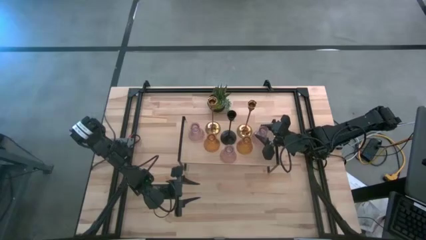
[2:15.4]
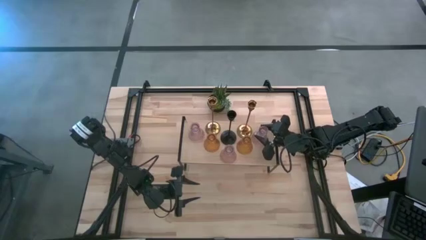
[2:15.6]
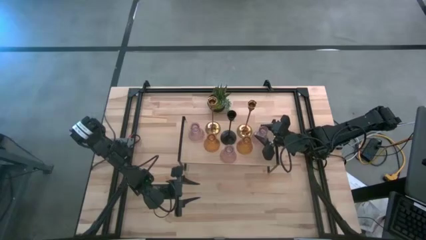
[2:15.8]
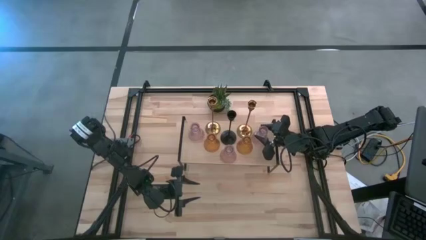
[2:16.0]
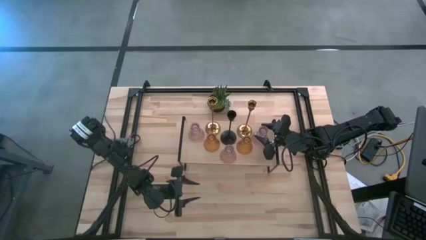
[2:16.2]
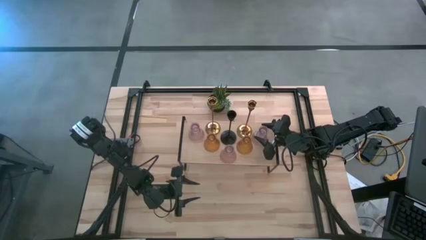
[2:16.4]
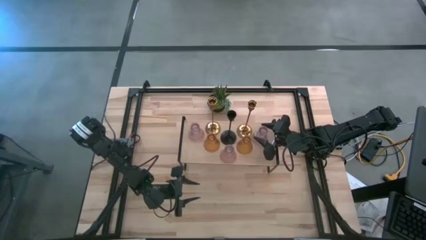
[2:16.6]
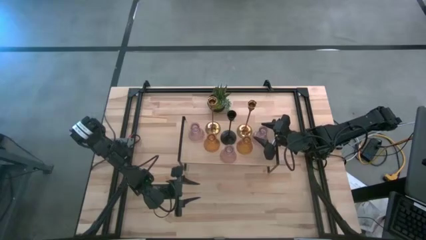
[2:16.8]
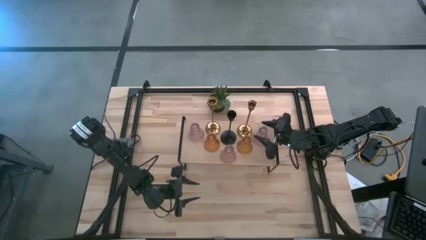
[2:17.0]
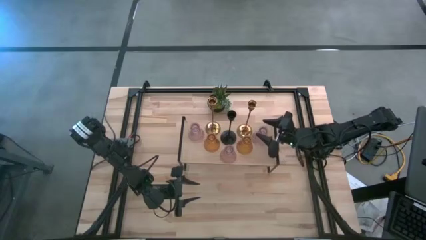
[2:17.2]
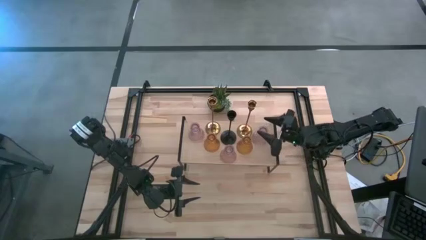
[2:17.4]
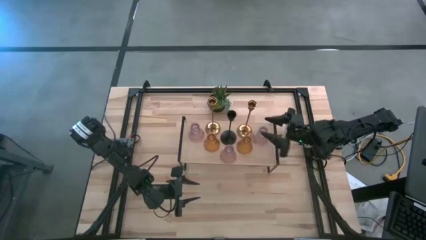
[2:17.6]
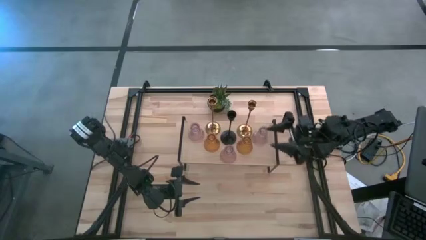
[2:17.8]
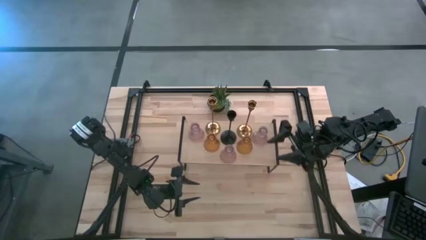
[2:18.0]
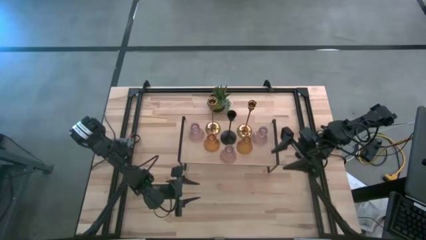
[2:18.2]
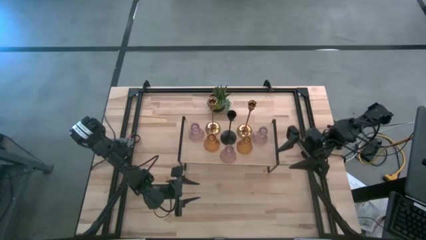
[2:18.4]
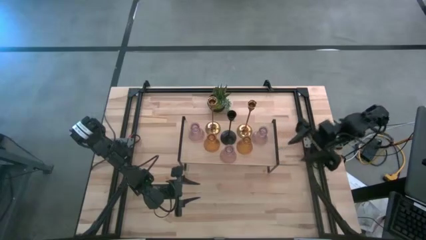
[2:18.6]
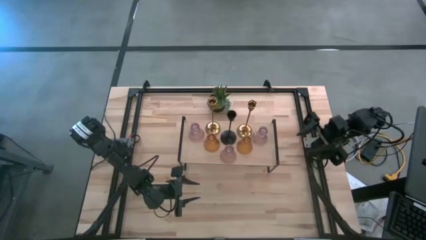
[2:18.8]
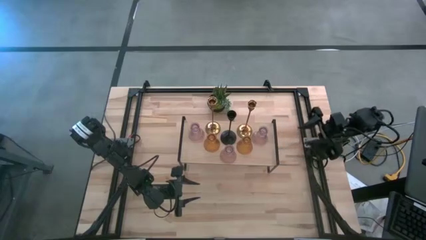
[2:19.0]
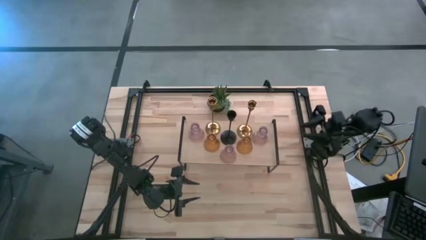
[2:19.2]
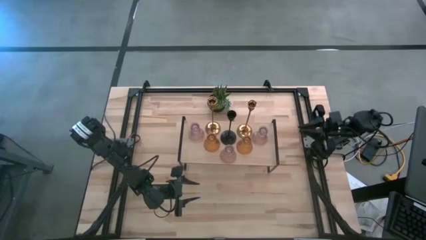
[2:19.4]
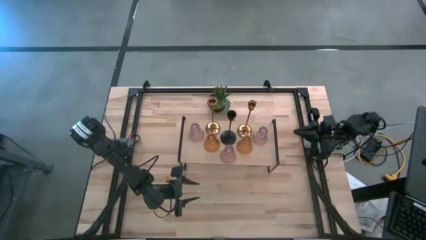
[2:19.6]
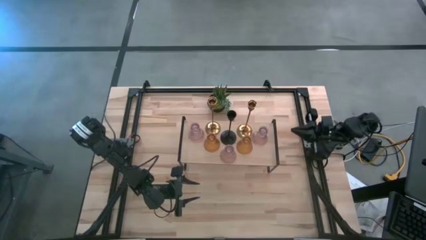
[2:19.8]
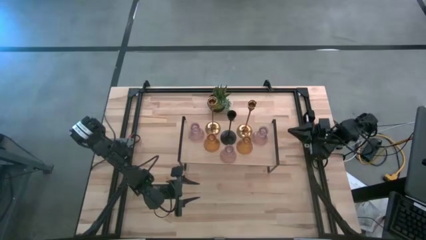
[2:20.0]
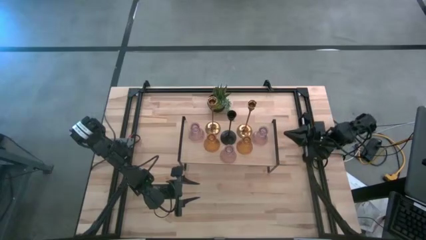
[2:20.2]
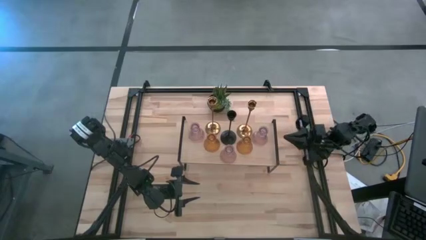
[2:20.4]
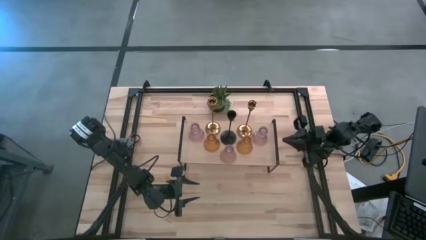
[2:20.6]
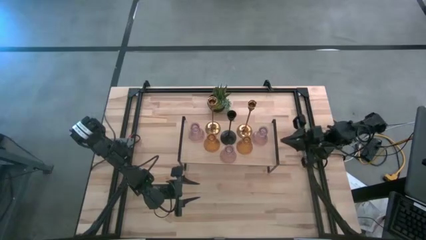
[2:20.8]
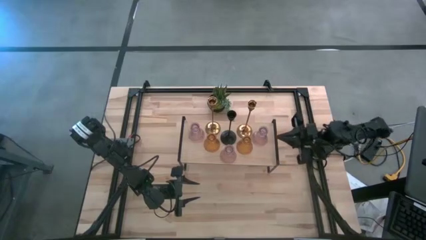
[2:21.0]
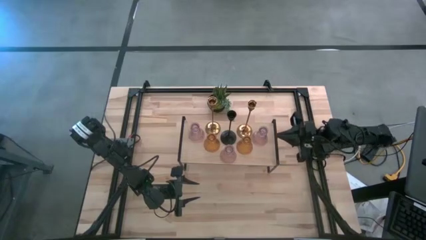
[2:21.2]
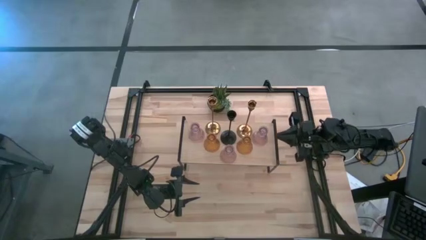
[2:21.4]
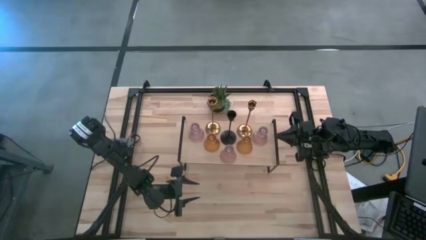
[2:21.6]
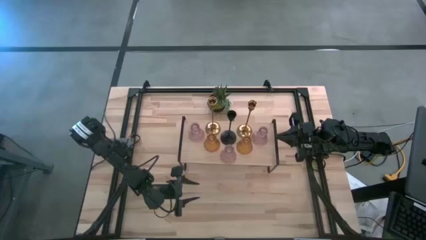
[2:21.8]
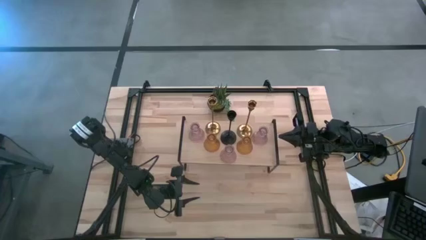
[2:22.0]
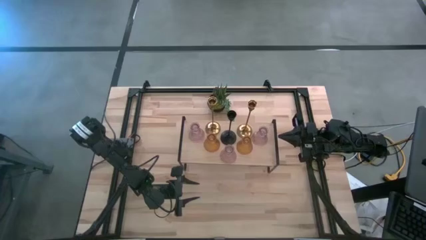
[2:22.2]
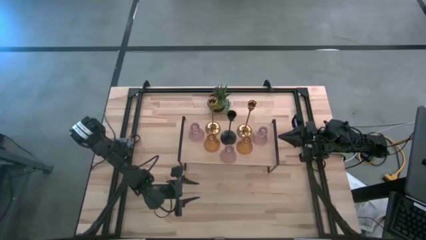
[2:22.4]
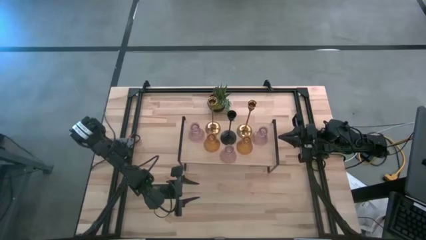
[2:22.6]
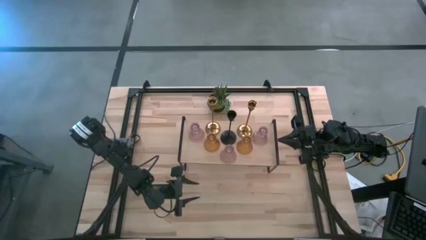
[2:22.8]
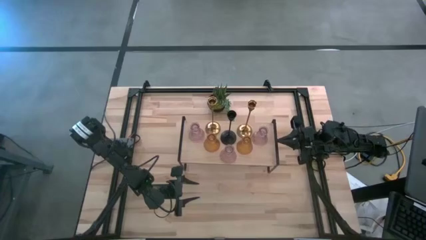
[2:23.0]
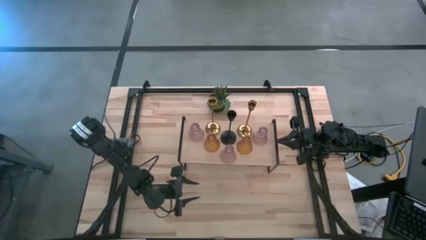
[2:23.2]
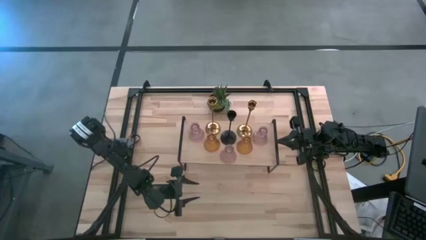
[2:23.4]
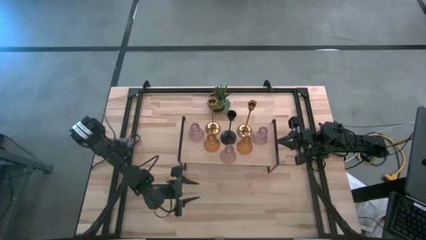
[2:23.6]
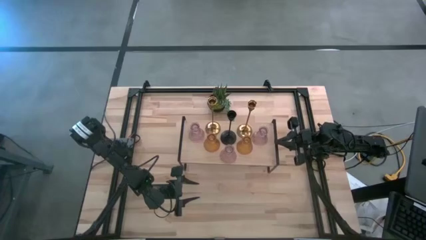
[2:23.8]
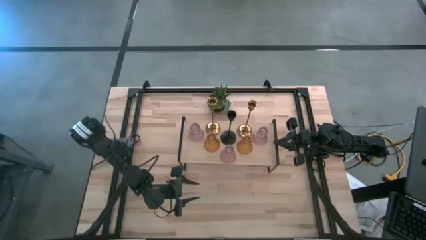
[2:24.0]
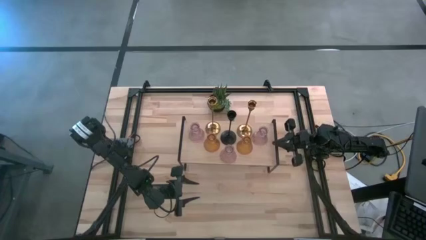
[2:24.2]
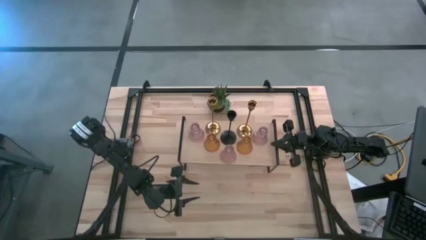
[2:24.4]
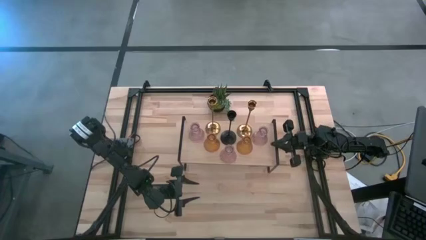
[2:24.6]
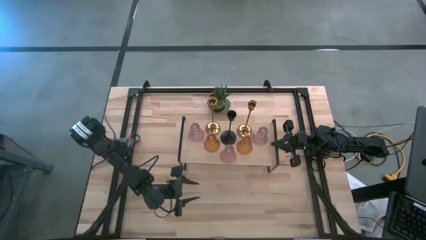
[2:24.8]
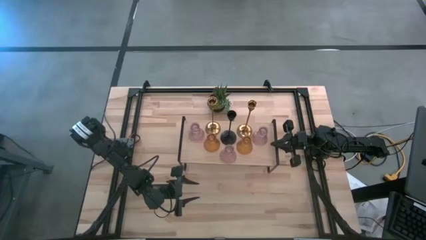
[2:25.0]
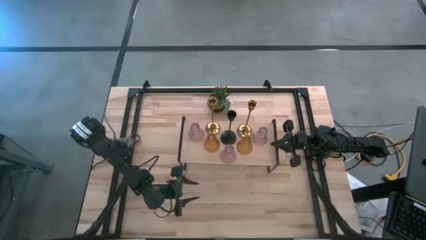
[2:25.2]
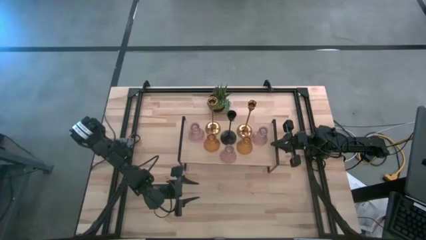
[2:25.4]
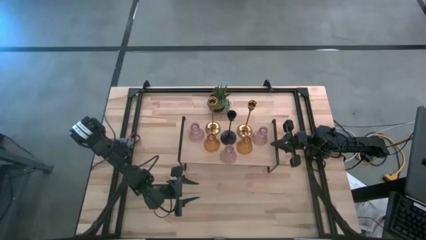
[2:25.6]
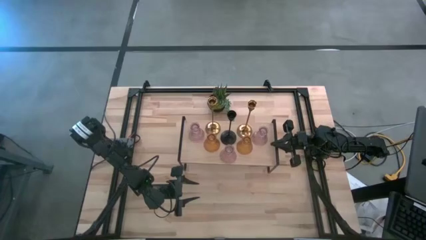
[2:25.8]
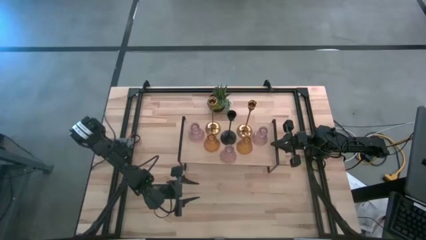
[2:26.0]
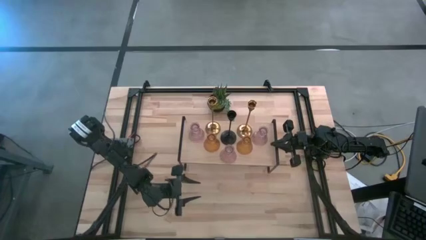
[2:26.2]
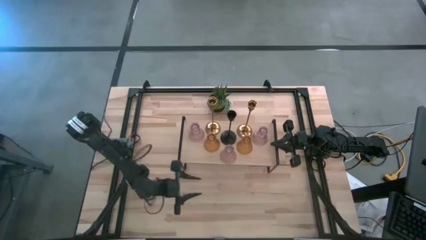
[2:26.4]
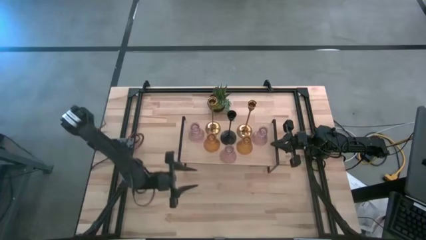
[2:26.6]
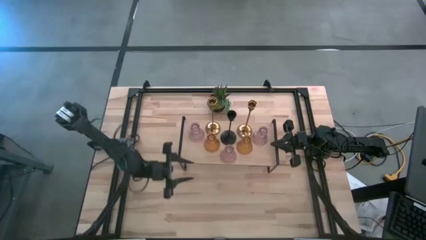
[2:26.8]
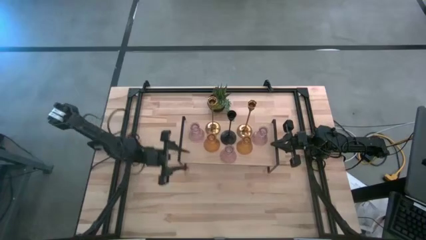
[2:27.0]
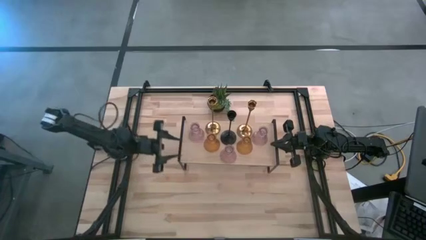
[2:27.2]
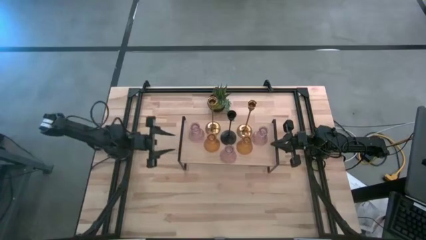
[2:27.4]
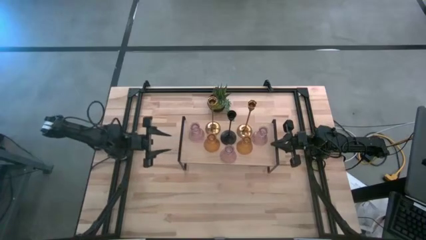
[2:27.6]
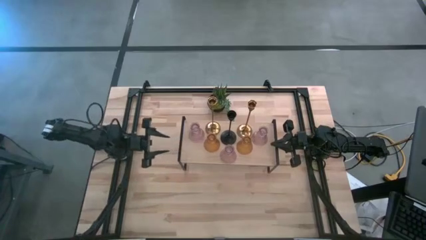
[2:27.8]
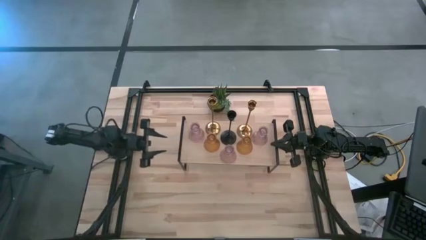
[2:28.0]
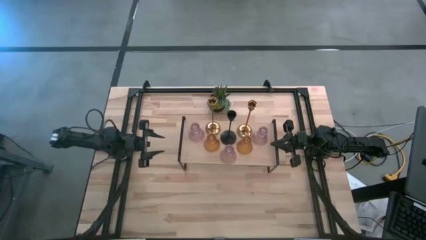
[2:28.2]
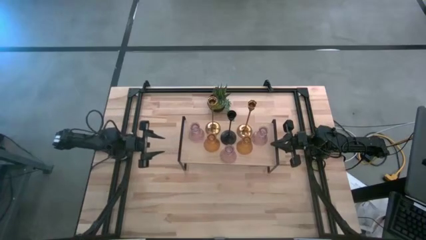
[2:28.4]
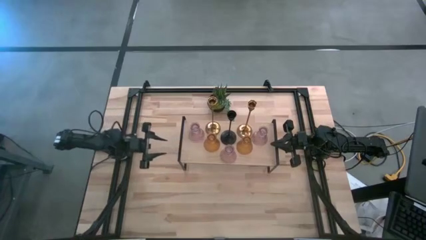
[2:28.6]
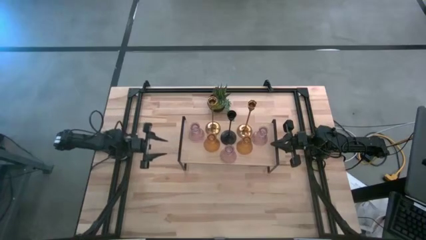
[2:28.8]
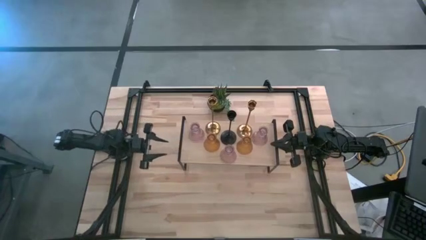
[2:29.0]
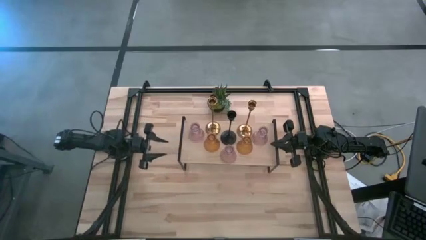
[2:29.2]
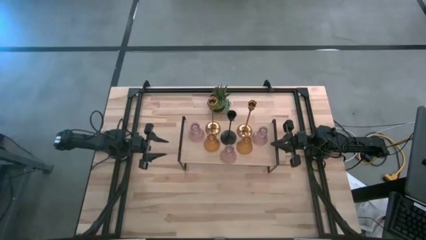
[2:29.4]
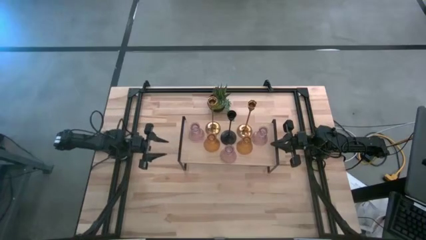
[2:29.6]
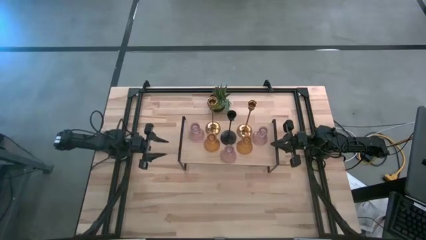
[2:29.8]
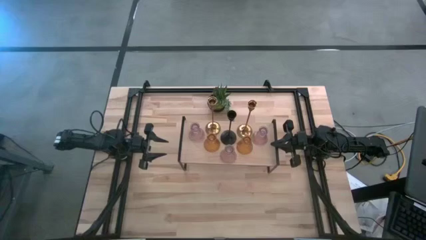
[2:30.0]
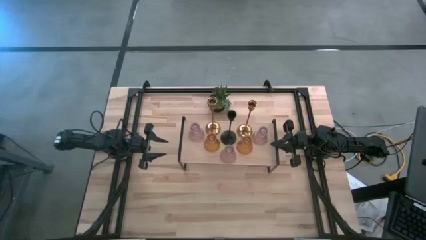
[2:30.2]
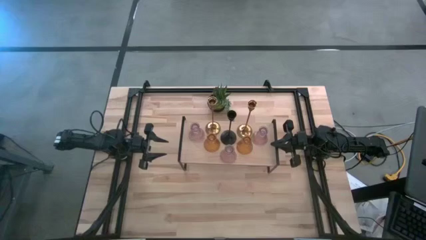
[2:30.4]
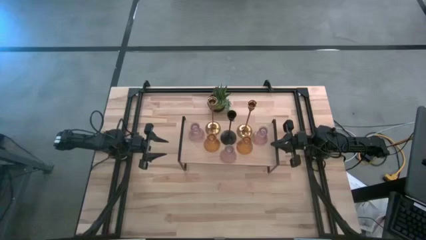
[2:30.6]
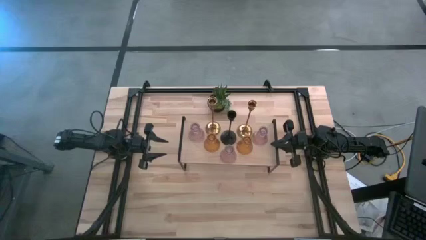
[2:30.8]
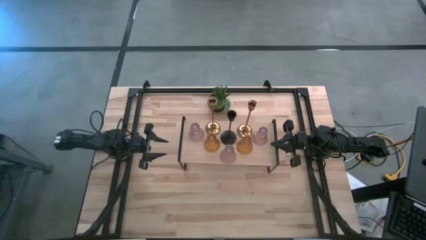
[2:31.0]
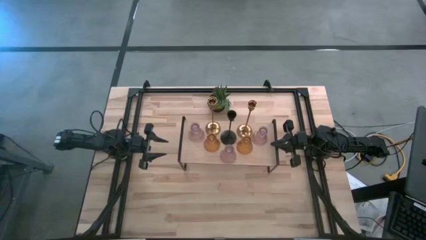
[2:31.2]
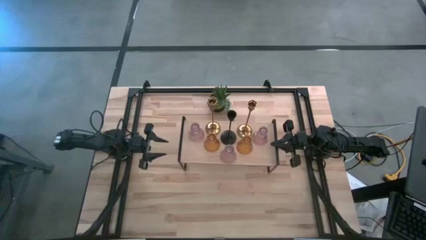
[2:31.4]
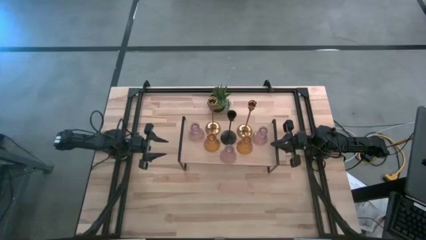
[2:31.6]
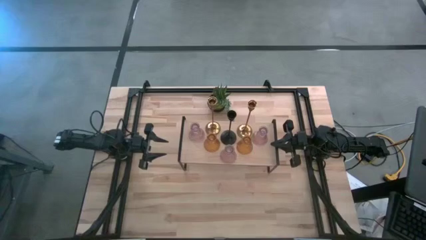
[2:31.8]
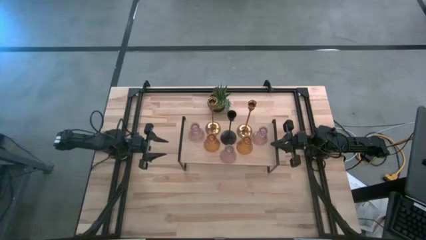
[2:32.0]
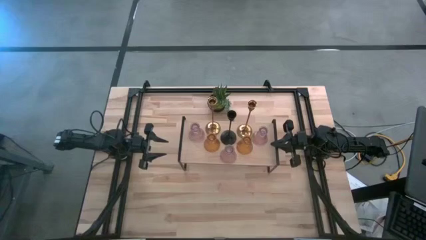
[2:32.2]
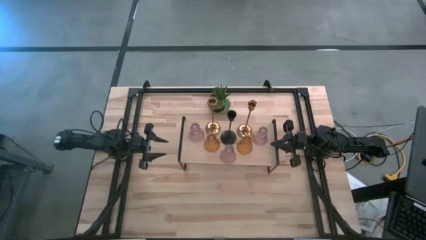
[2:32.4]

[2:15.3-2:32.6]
Task: Pick & Place candle stick holders
Return to Home Position

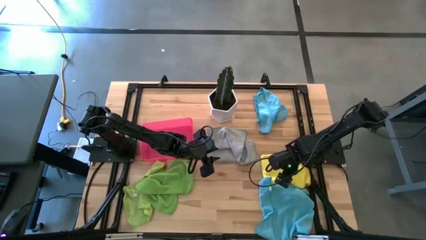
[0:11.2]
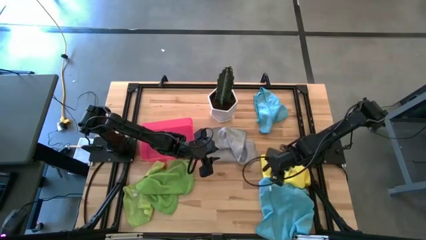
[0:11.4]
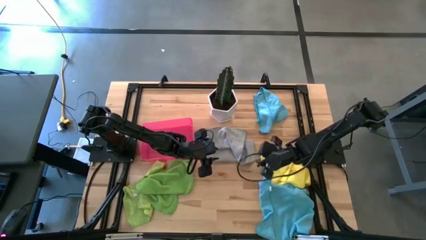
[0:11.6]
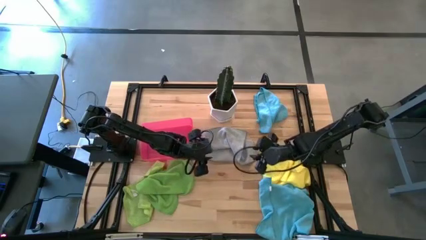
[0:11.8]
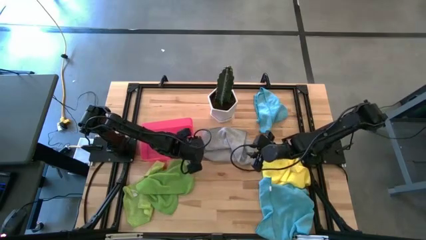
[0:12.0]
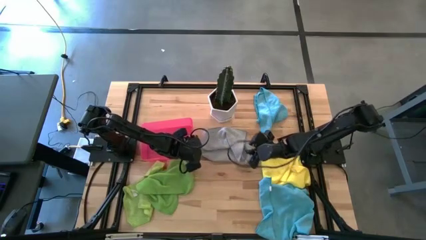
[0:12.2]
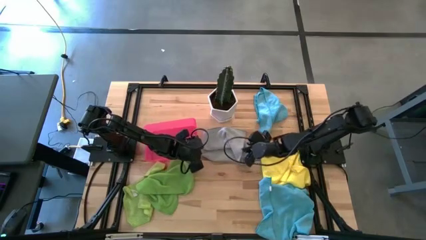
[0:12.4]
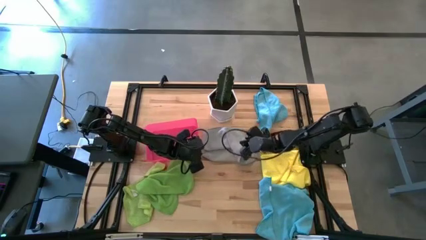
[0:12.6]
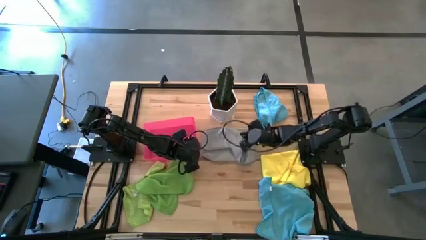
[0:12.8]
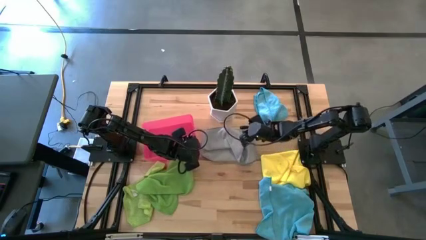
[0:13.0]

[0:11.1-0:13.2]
Task: Fold microfiber towels
Adjust the transparent pink bin on the table
